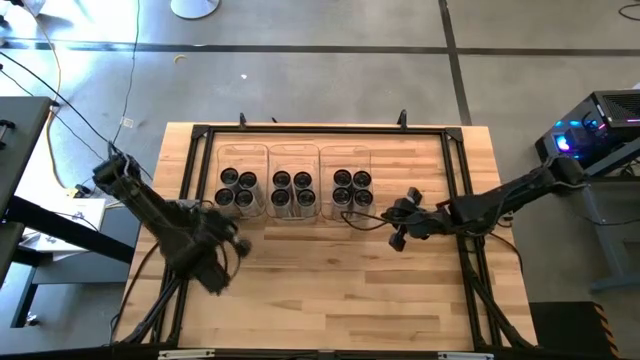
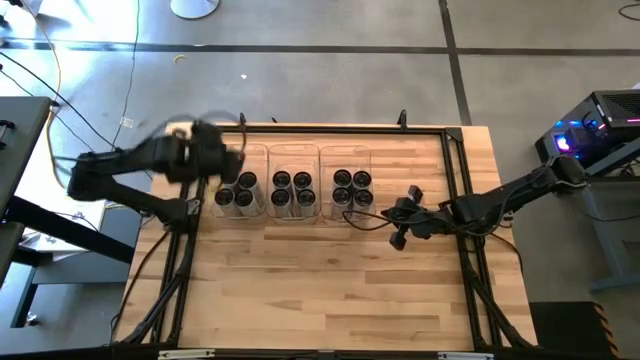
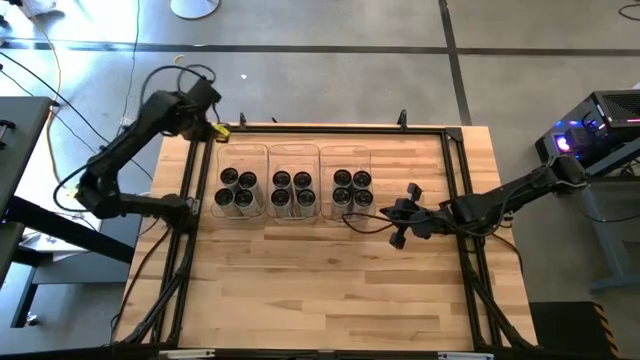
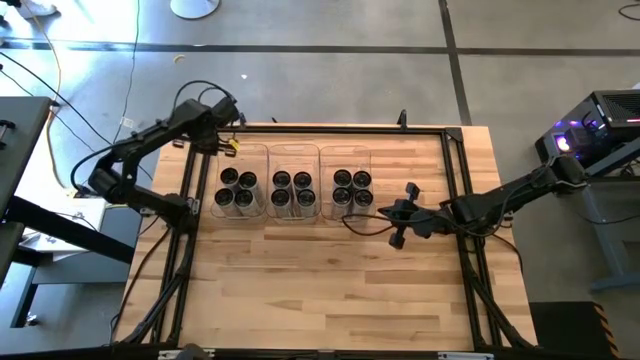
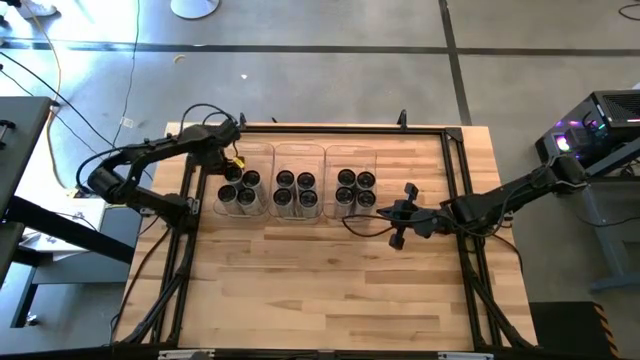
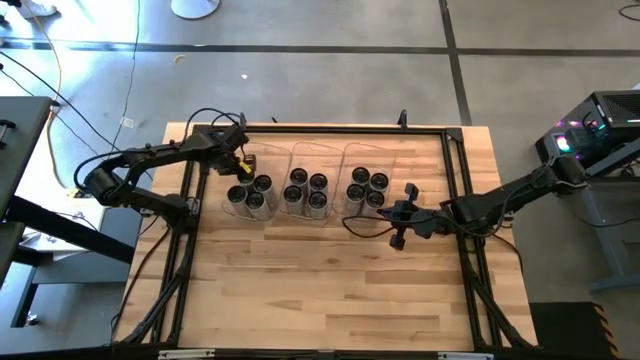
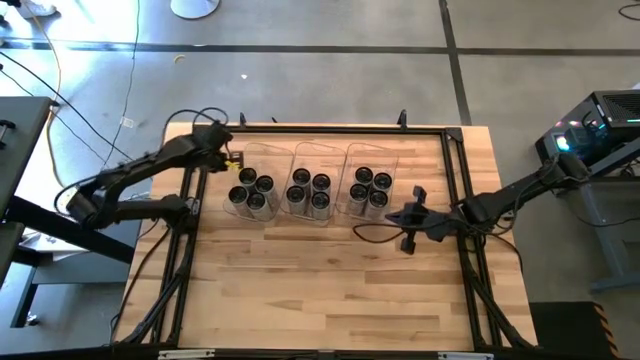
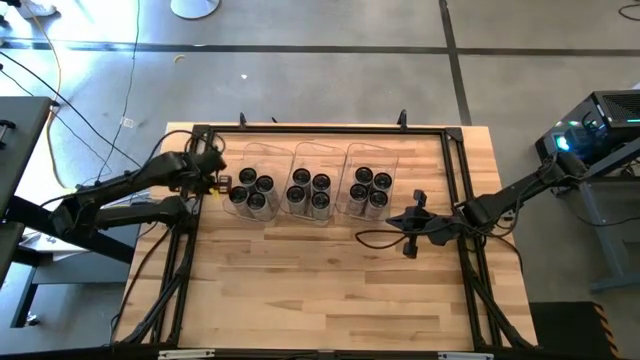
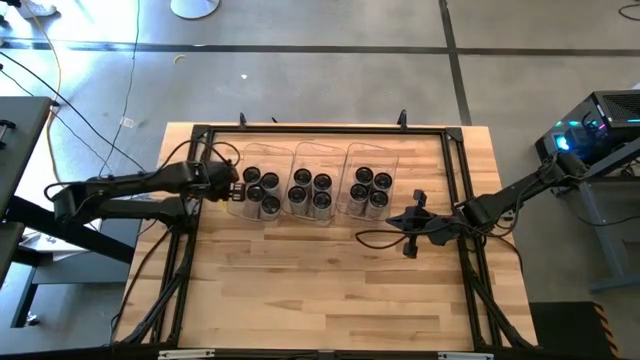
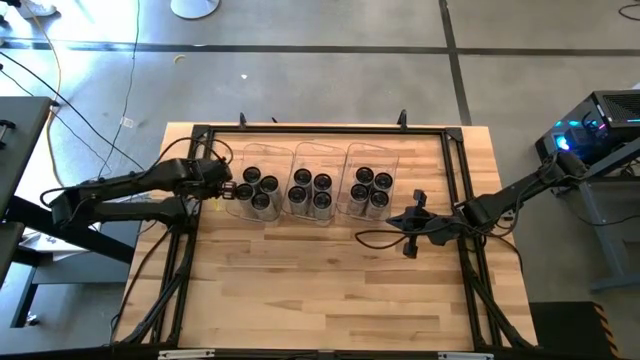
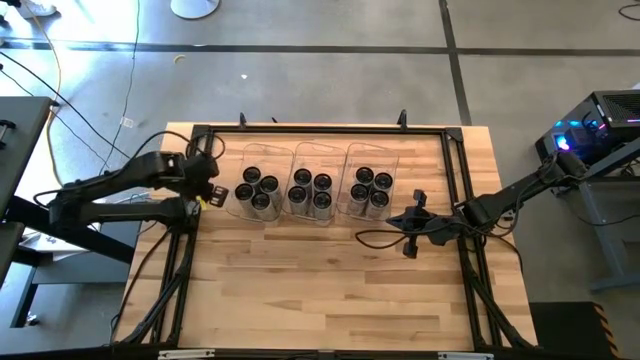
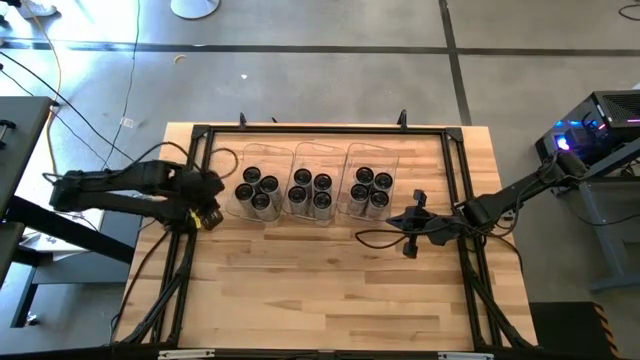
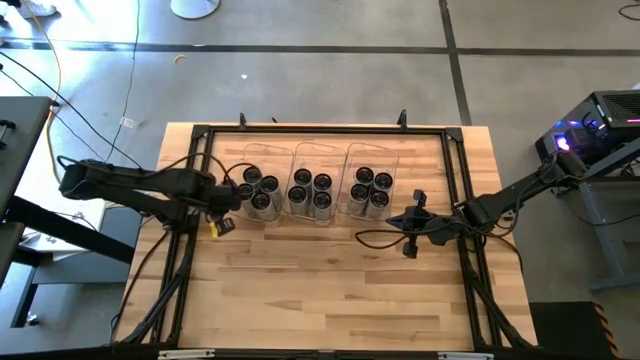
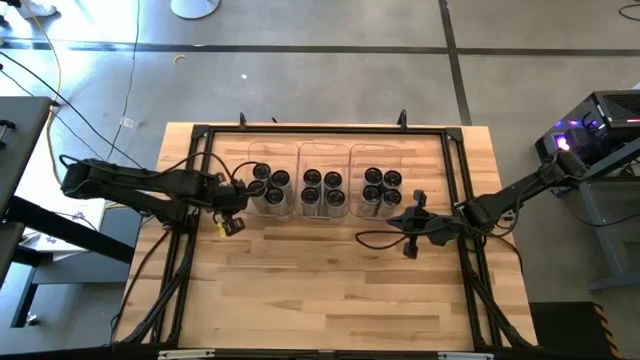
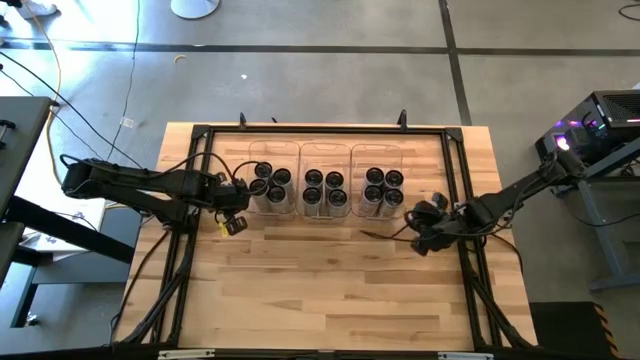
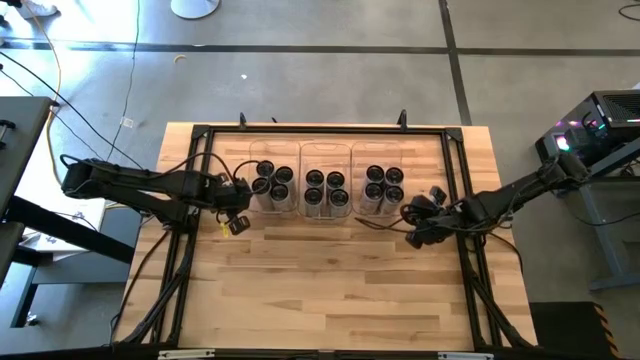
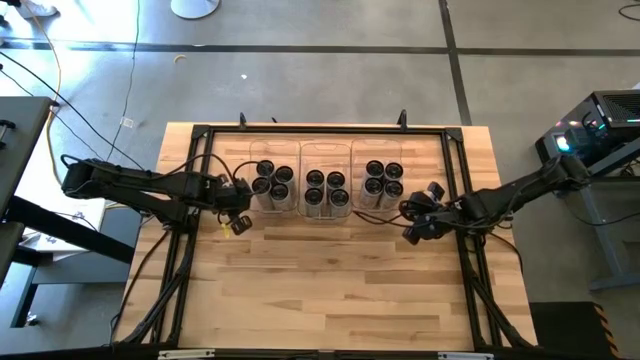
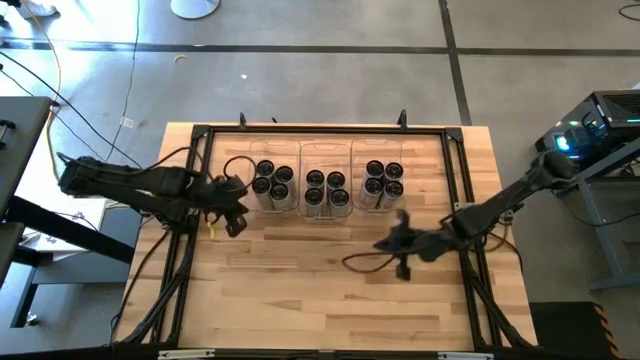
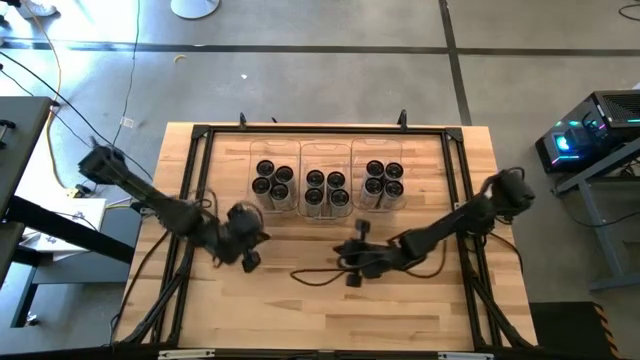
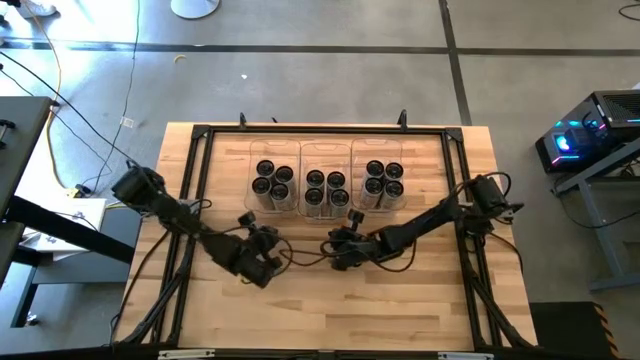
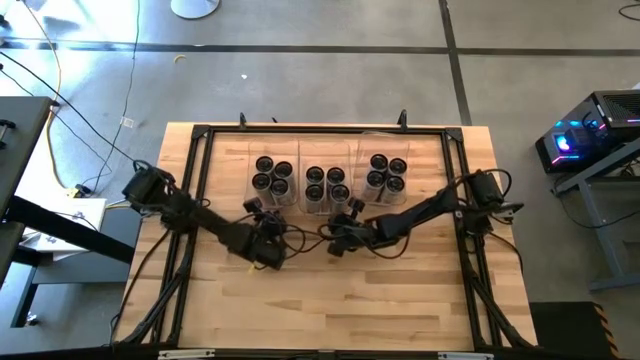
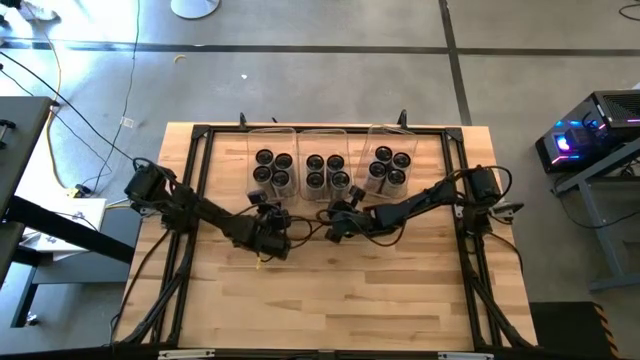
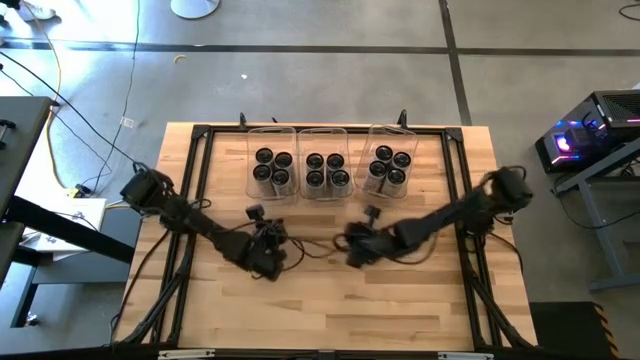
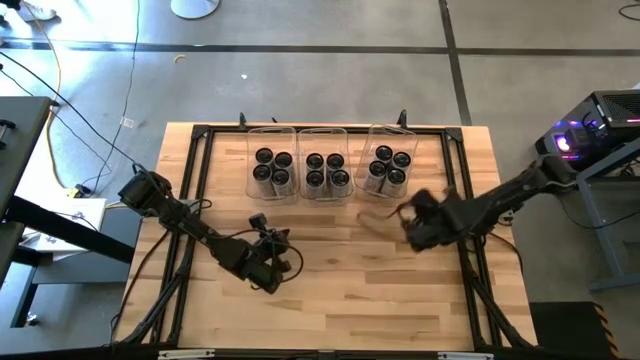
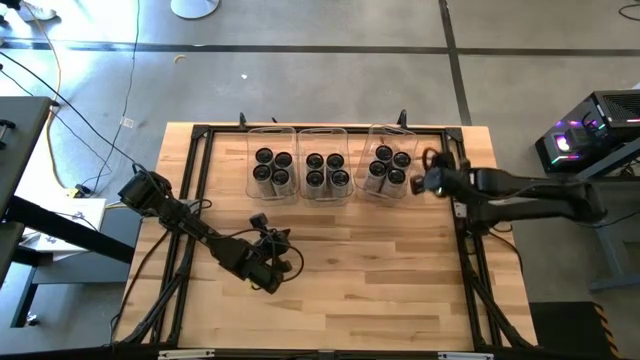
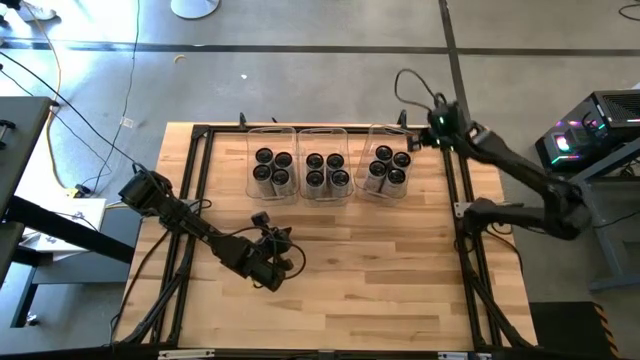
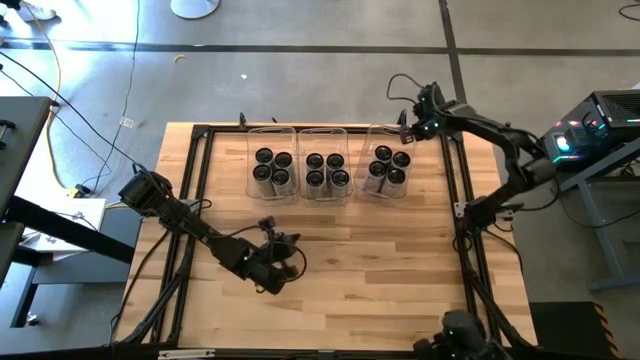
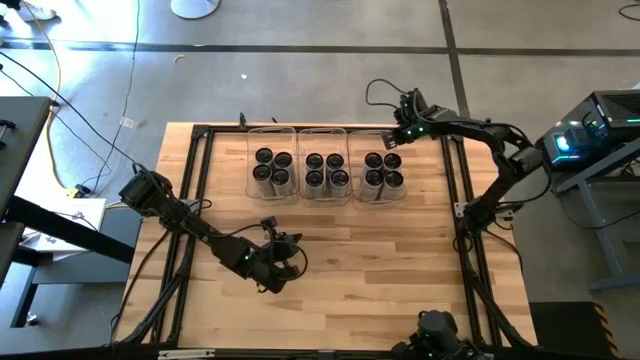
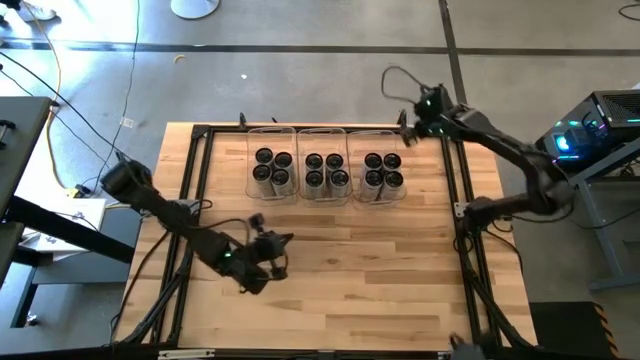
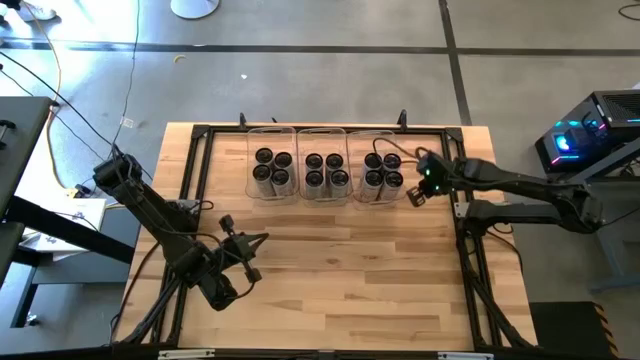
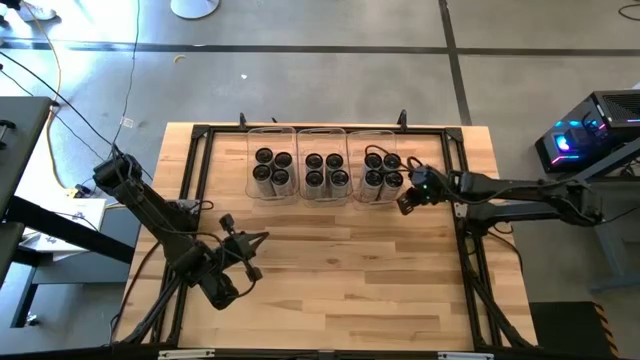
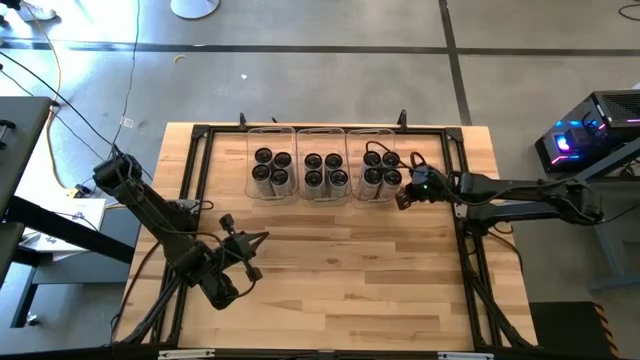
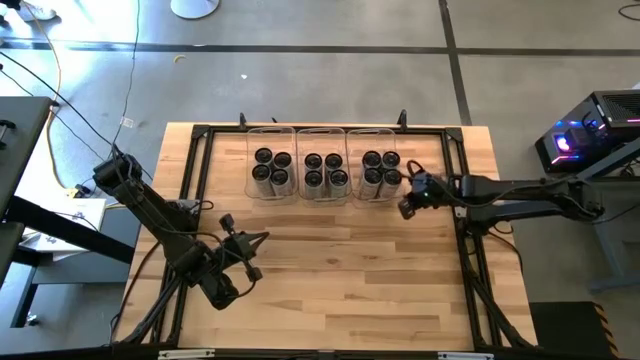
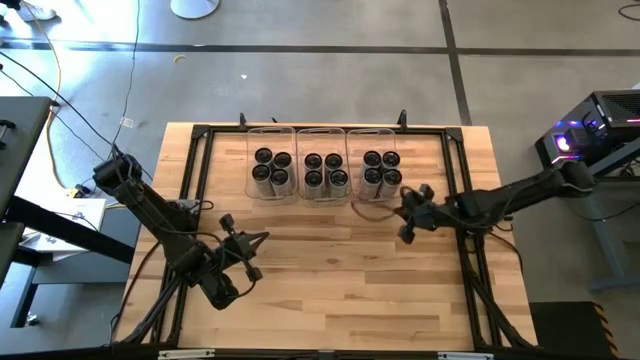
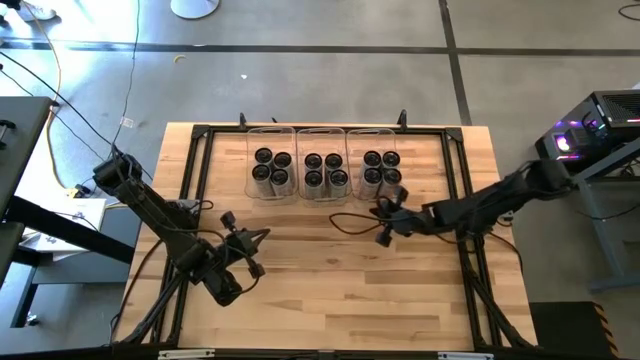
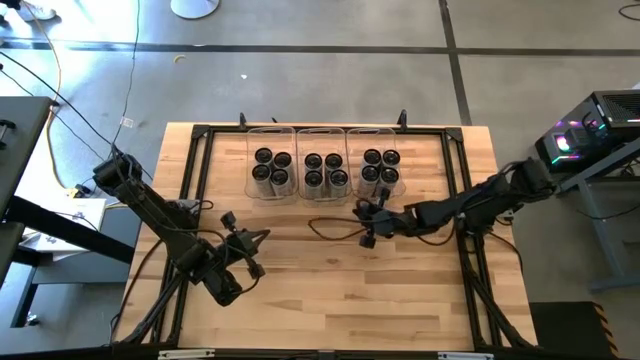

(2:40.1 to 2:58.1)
Task: Sort soda cans
Adjust the transparent bins

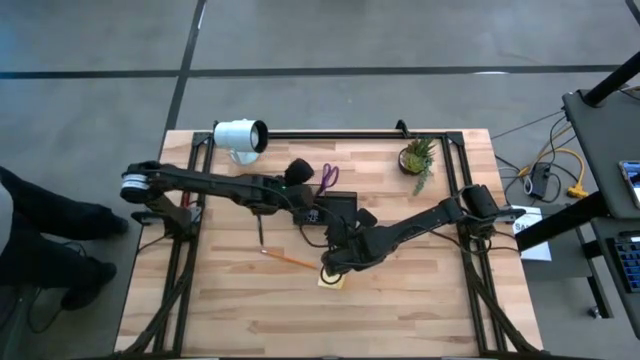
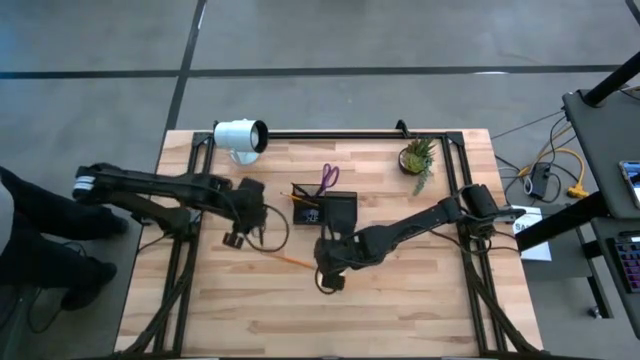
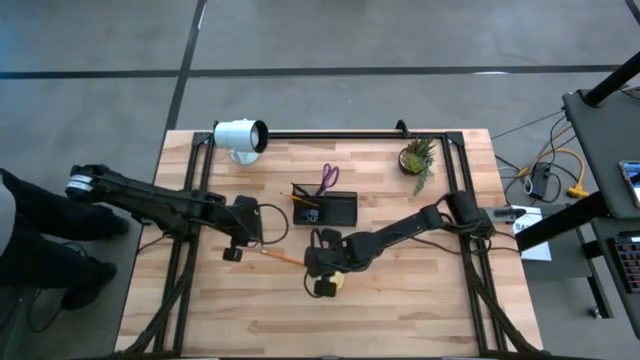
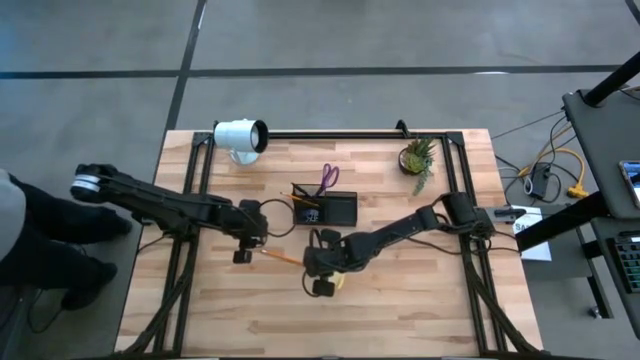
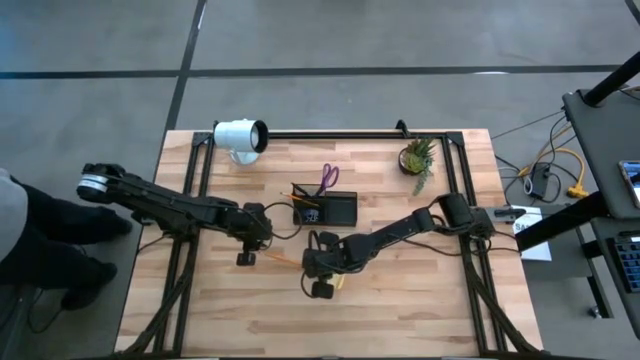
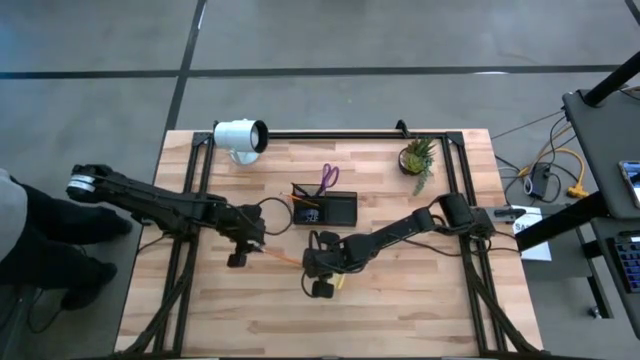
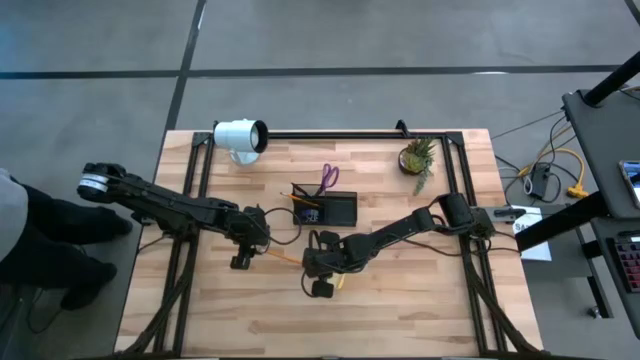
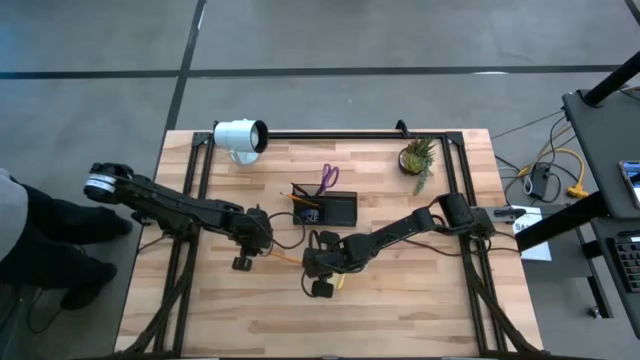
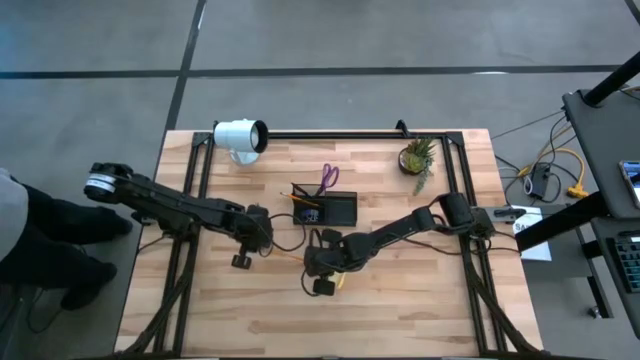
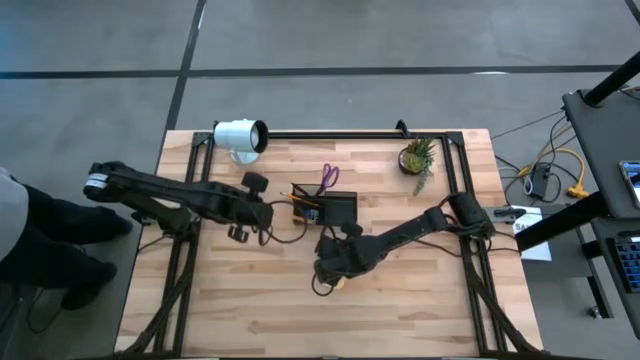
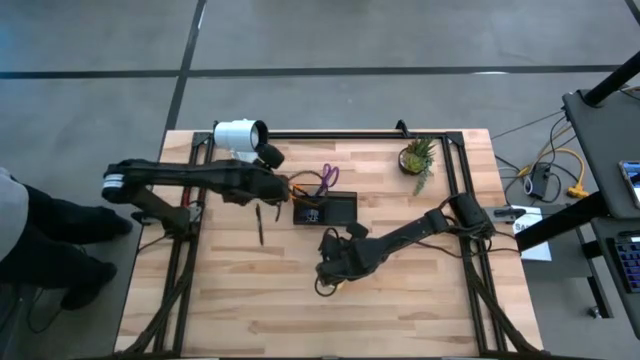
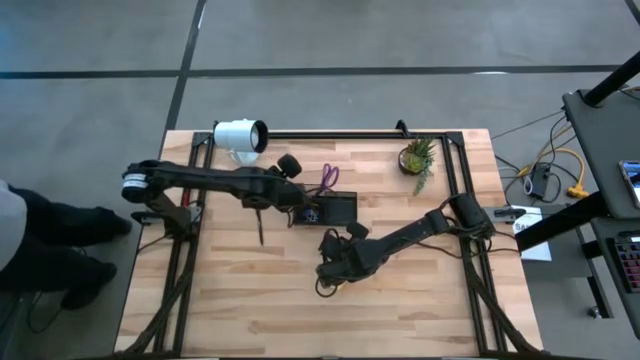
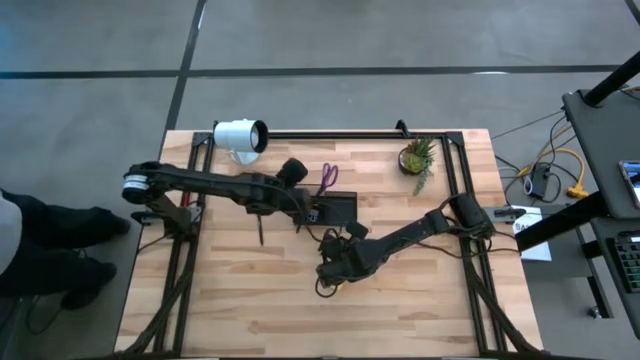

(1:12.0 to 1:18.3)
Task: Pick and place office supplies into organizer
Put the orange pencil into the black desk organizer
